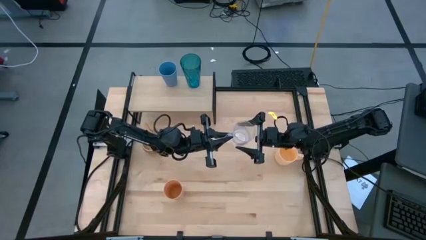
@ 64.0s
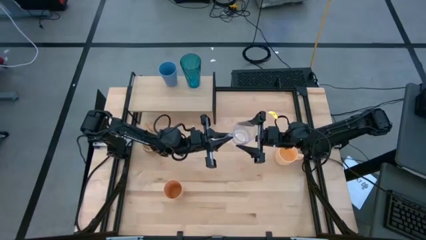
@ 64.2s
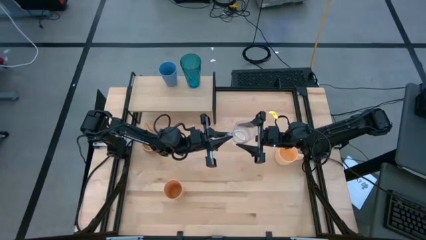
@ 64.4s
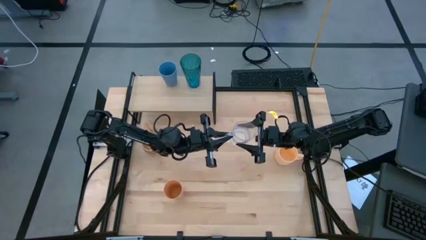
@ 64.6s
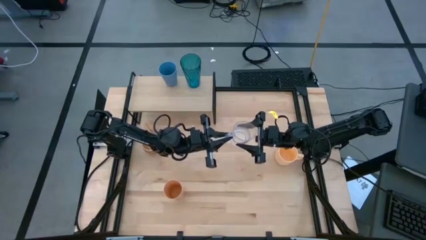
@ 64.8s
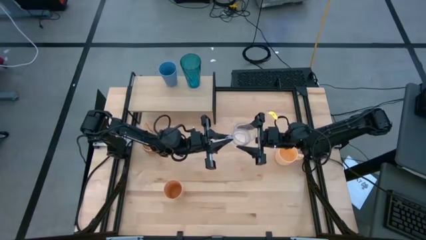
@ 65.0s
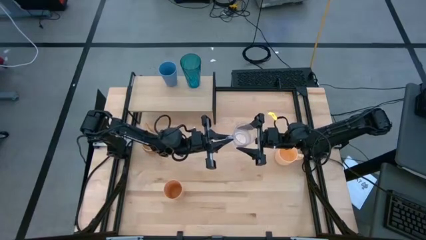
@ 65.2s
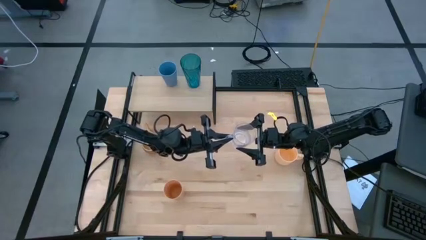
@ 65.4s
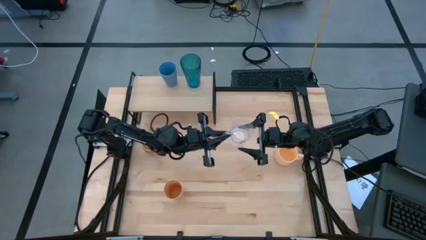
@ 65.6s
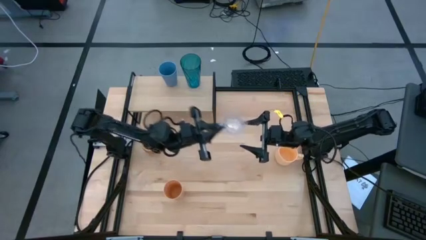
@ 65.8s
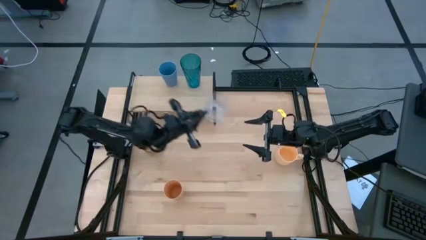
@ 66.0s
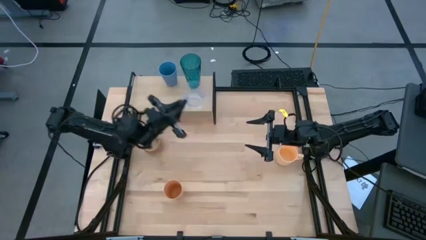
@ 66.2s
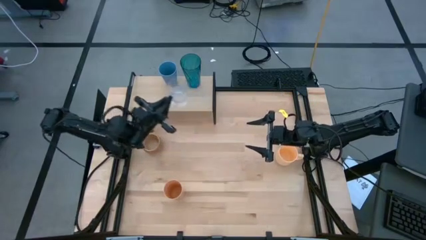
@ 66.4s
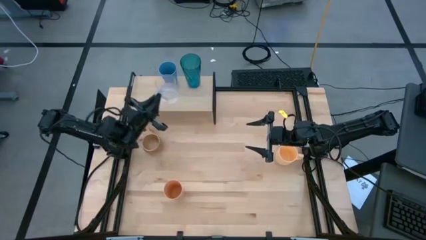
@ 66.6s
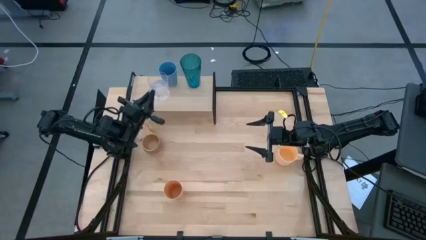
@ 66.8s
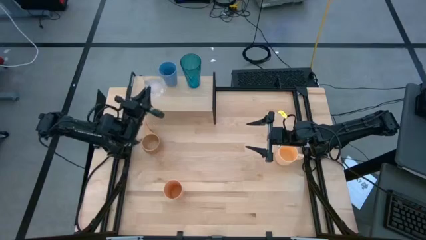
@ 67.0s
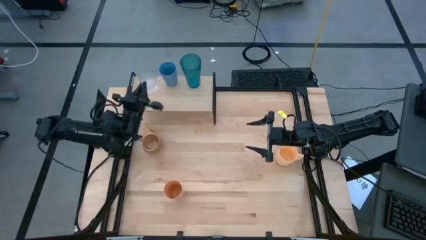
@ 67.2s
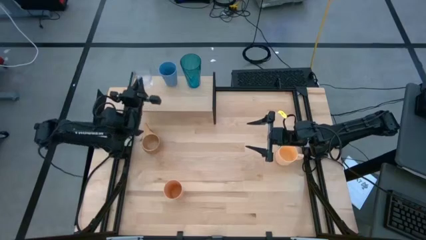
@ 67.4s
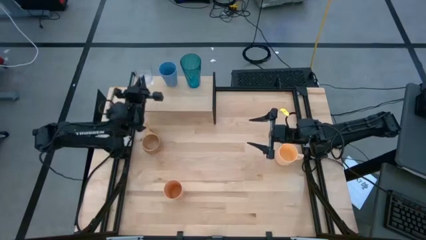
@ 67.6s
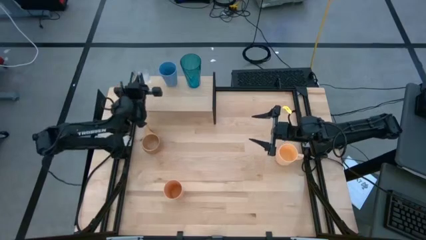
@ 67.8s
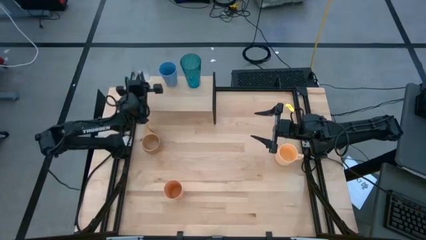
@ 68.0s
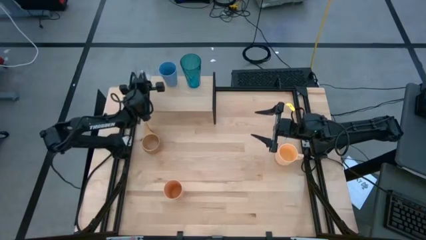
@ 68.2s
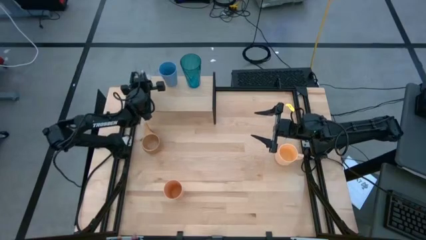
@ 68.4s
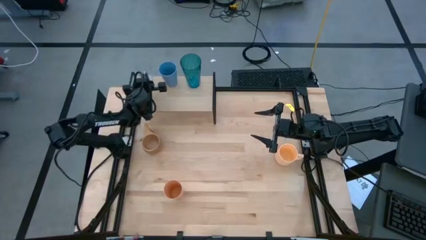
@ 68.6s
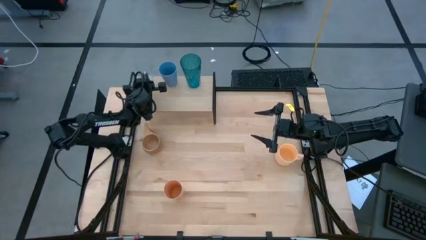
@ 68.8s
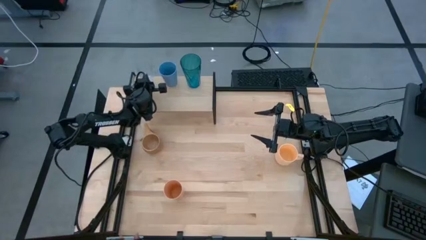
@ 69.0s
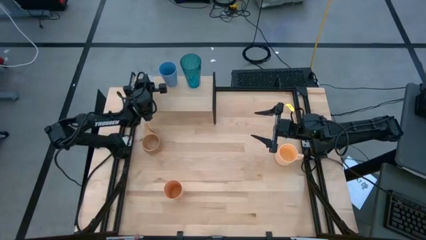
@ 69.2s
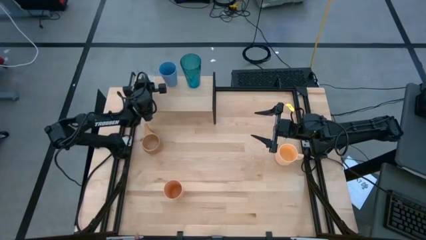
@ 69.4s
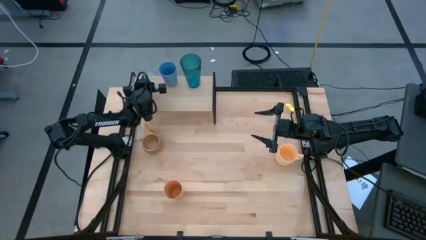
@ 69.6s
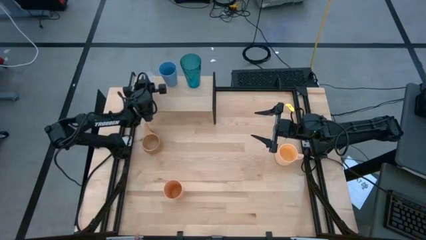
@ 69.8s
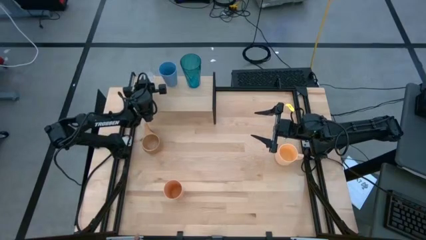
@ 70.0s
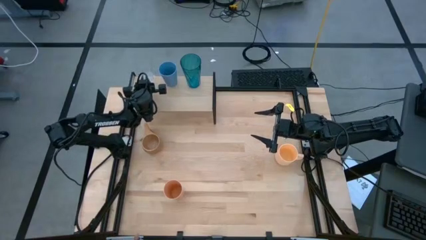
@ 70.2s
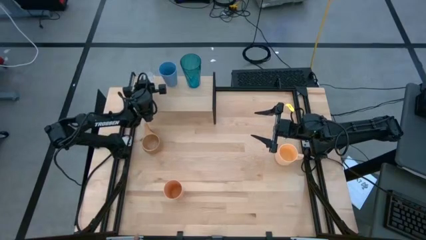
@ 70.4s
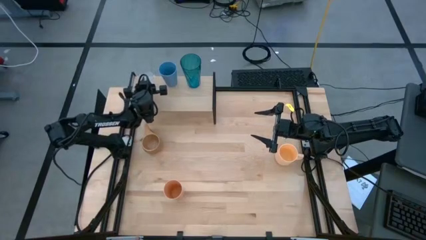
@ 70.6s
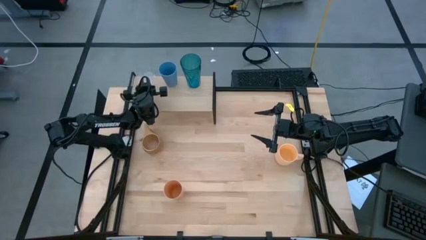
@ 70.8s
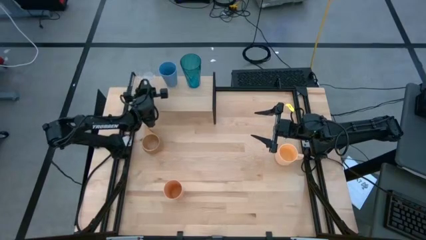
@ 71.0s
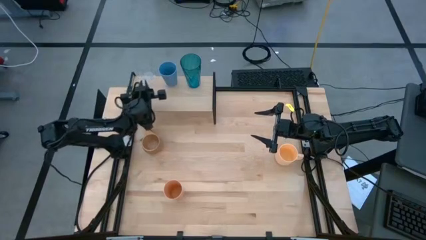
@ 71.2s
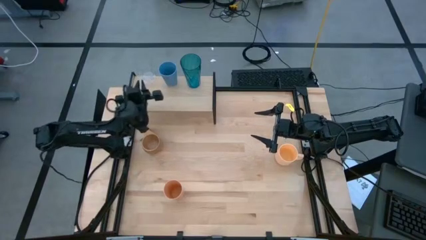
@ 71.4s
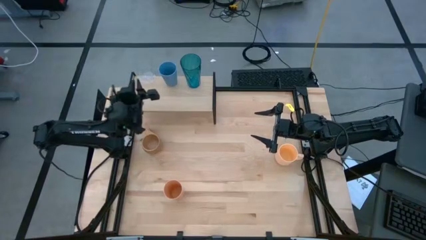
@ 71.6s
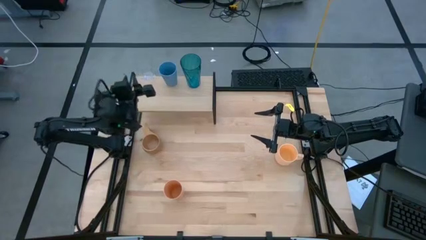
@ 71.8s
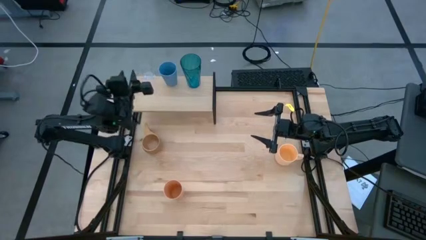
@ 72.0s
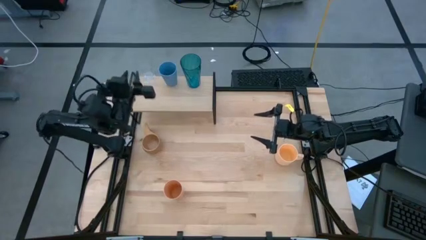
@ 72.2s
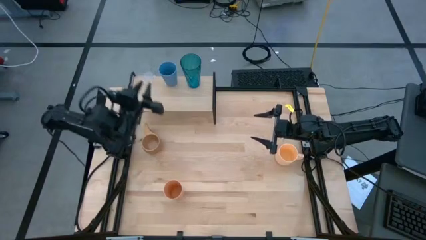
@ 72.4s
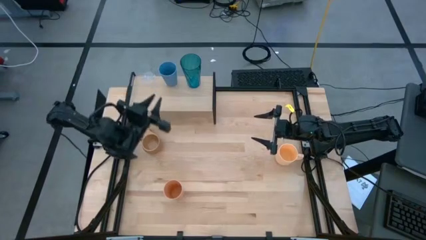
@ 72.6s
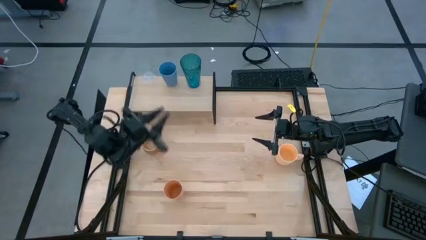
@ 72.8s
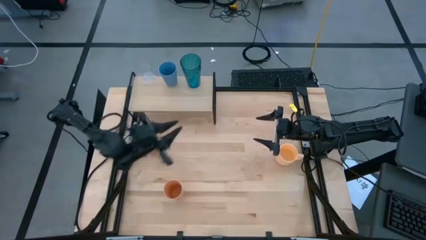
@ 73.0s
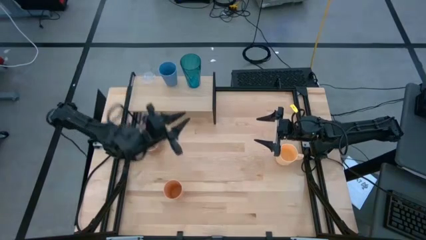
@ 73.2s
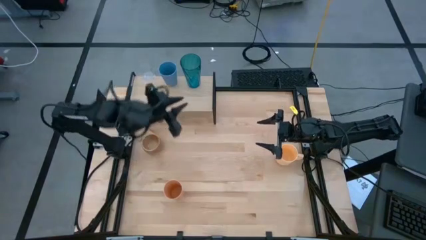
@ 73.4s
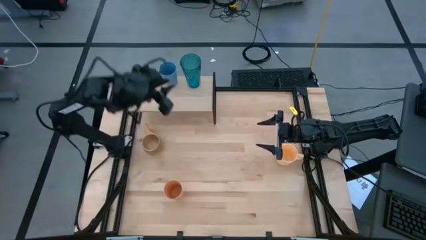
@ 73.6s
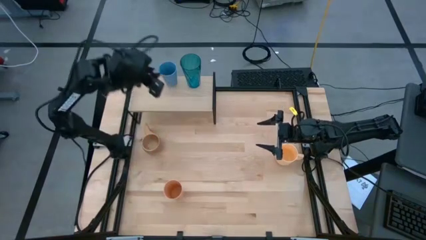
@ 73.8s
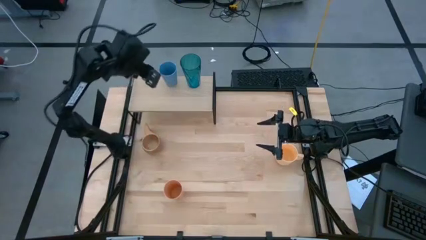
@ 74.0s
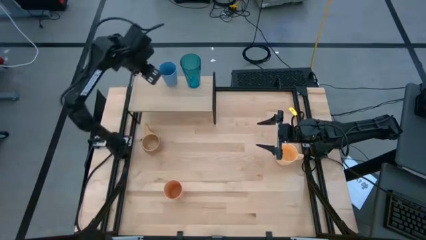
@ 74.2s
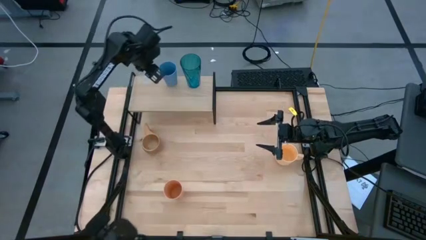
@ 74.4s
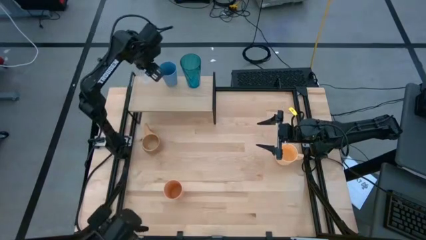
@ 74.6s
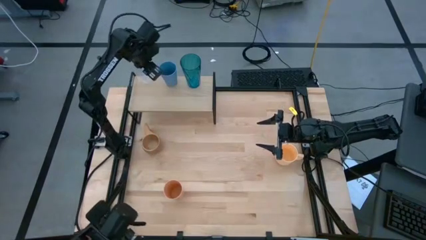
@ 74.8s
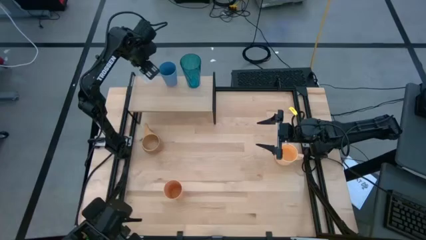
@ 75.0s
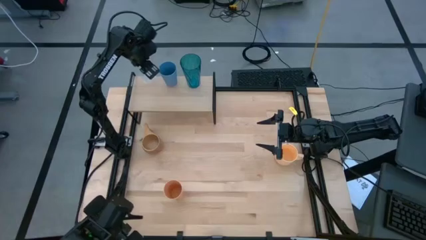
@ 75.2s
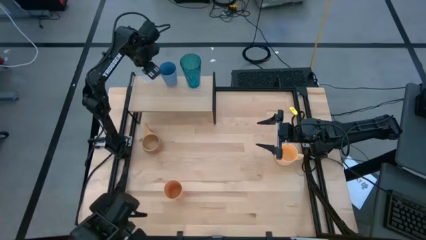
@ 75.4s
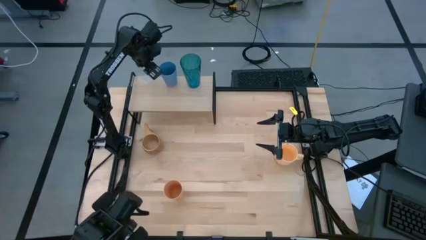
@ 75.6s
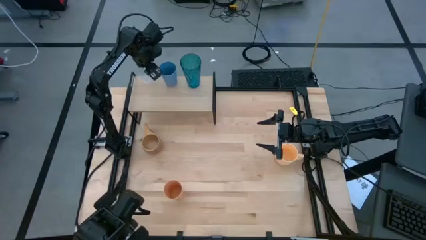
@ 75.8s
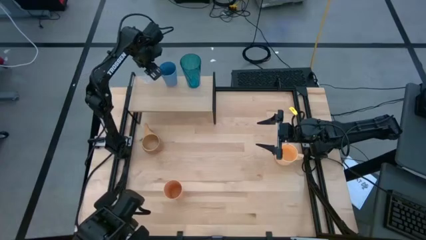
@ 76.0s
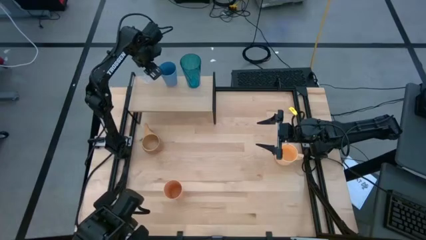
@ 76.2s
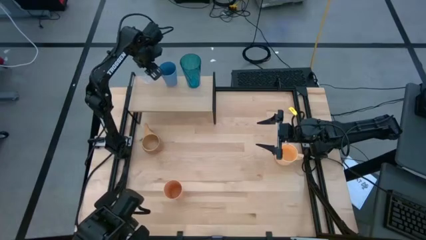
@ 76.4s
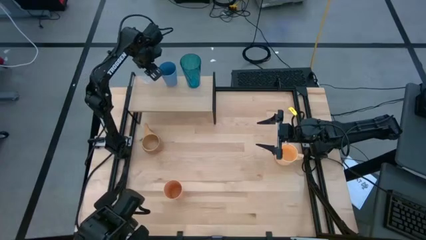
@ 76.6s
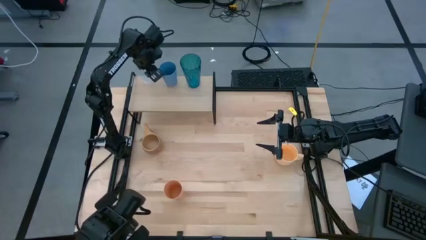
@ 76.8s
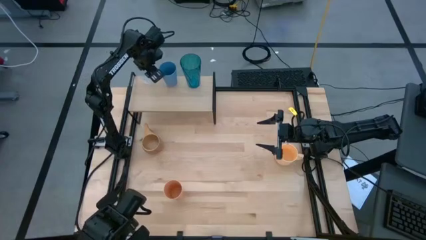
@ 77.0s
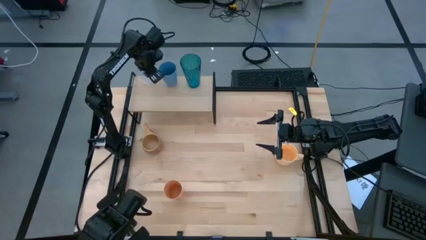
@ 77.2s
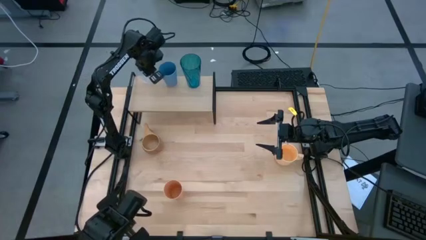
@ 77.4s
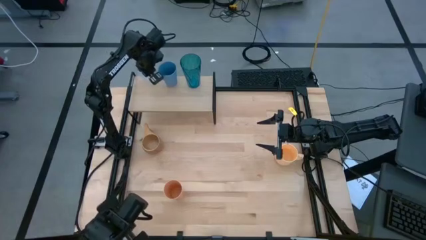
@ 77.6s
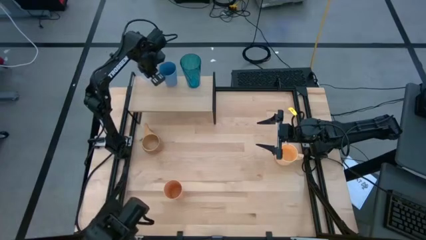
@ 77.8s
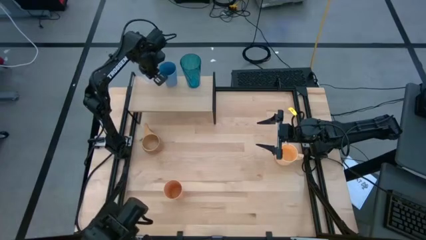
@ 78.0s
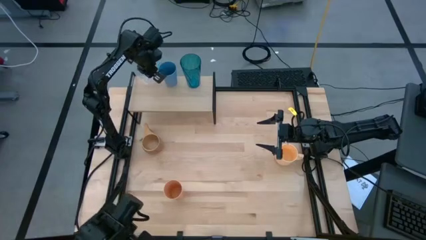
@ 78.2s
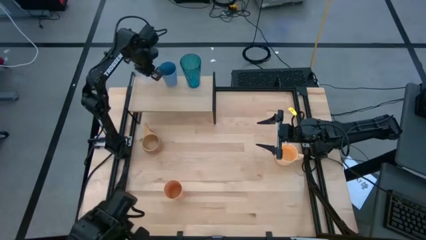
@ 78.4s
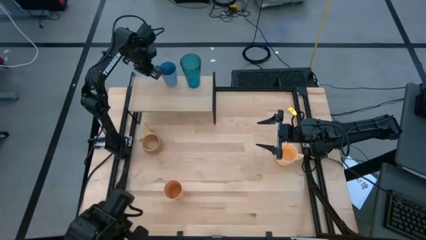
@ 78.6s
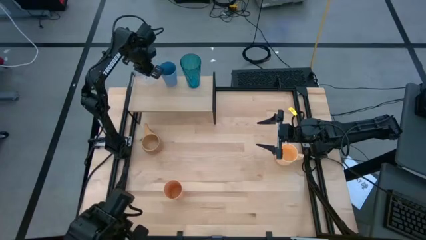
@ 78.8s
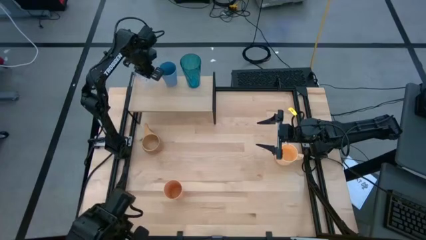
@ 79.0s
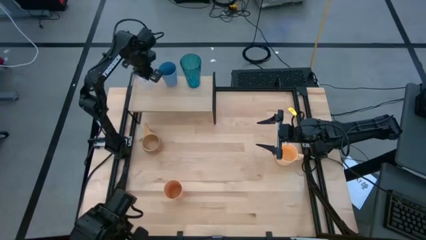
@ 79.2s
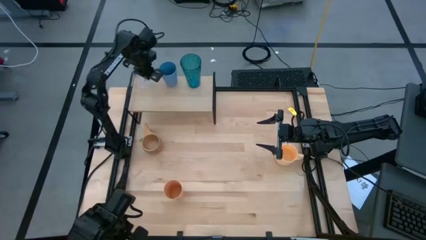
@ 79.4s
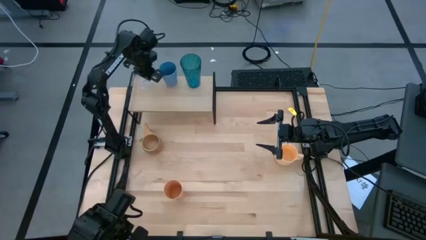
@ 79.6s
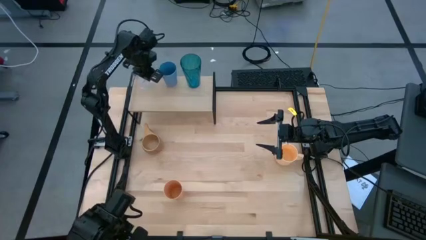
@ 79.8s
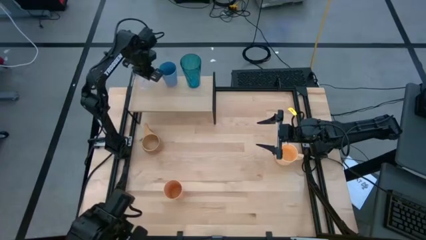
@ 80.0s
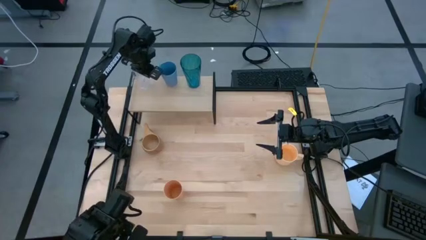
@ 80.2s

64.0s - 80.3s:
Task: Stack small to large cups/mugs on shelf
Put the transparent mug on the shelf
